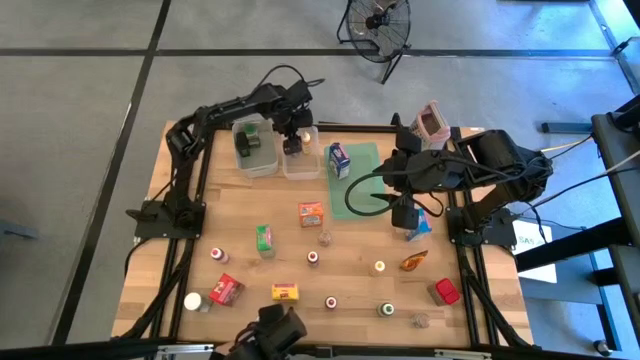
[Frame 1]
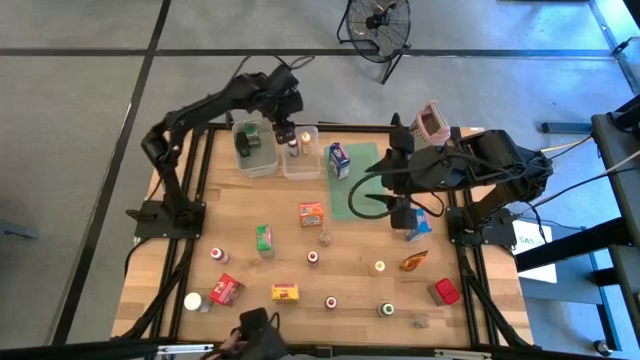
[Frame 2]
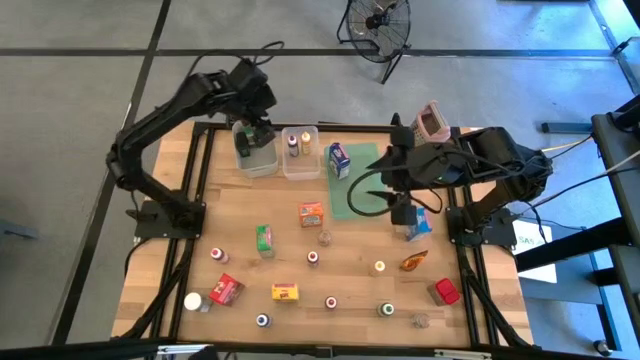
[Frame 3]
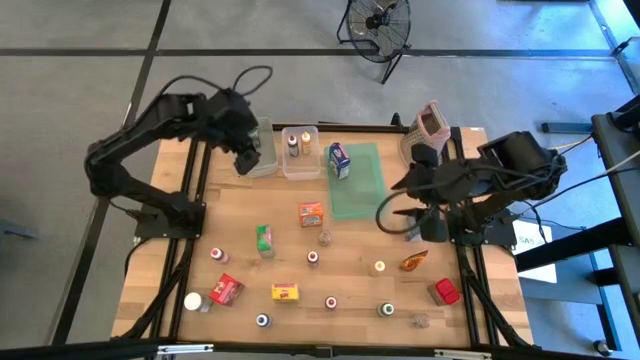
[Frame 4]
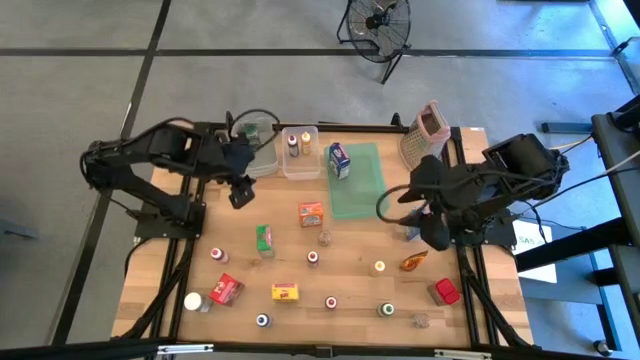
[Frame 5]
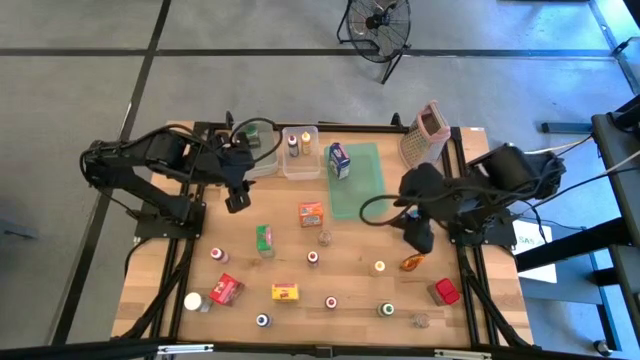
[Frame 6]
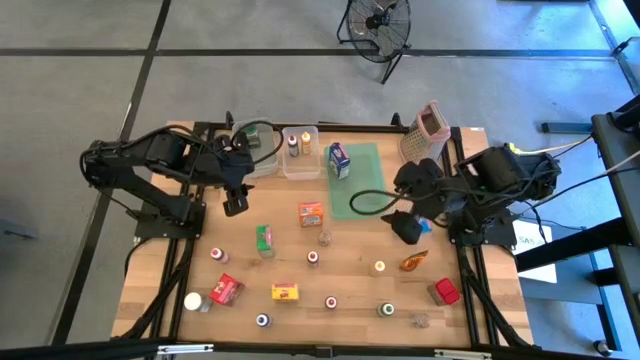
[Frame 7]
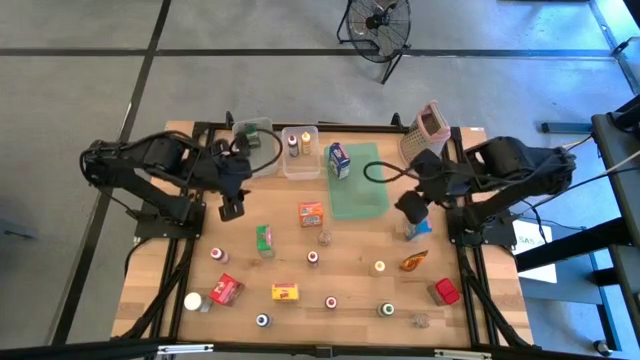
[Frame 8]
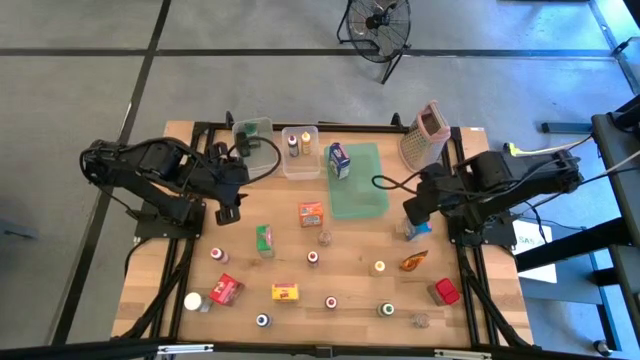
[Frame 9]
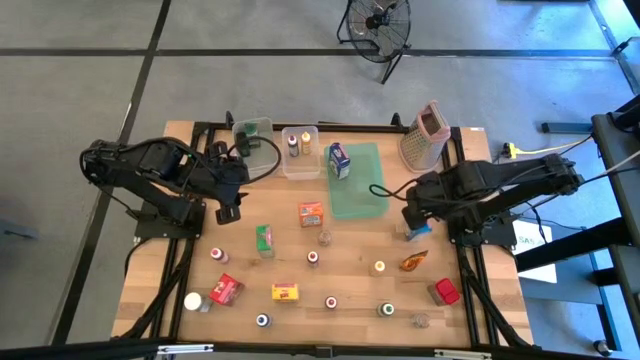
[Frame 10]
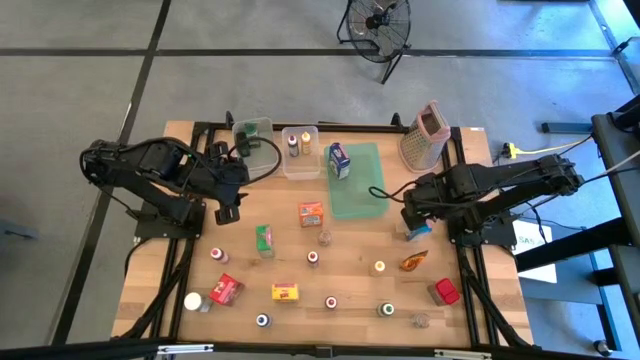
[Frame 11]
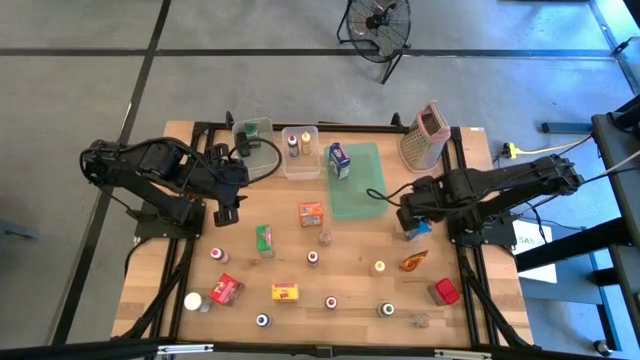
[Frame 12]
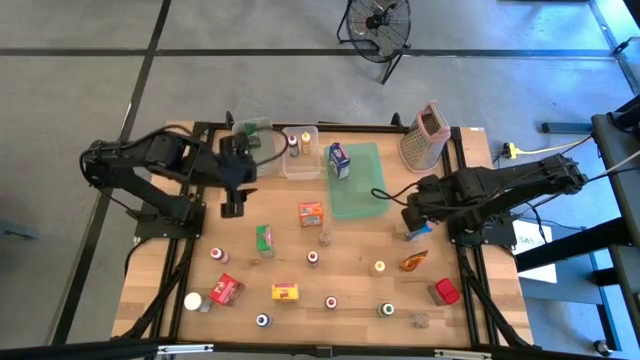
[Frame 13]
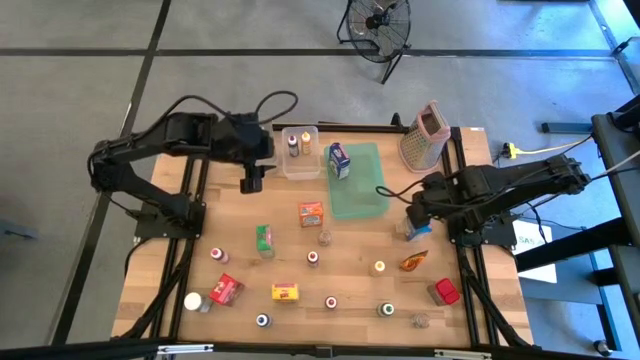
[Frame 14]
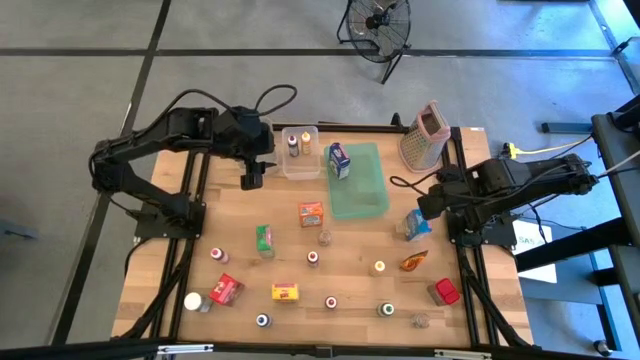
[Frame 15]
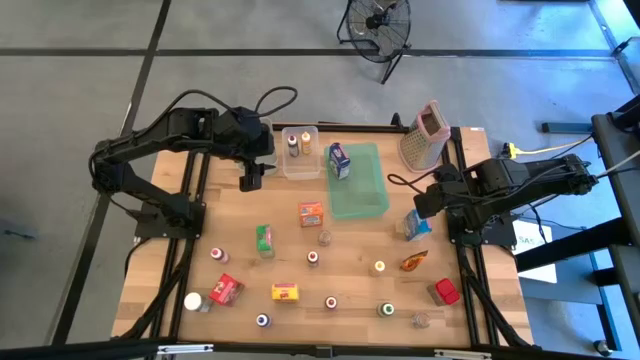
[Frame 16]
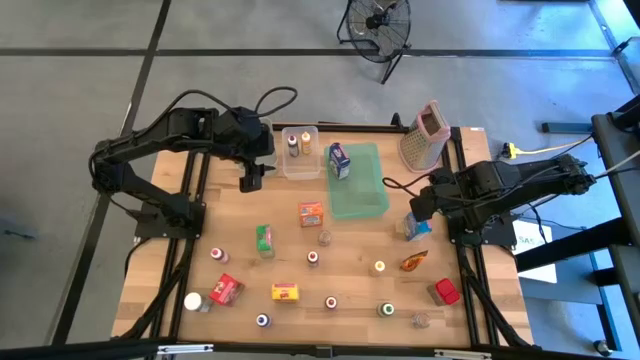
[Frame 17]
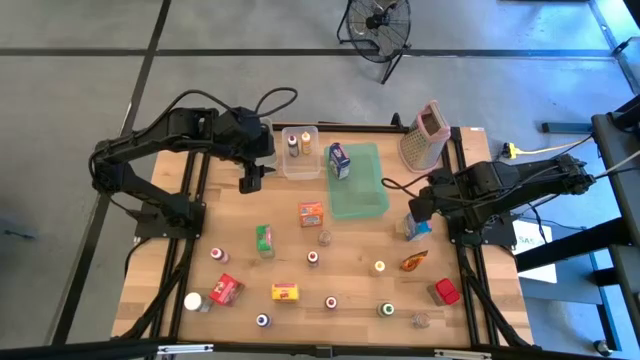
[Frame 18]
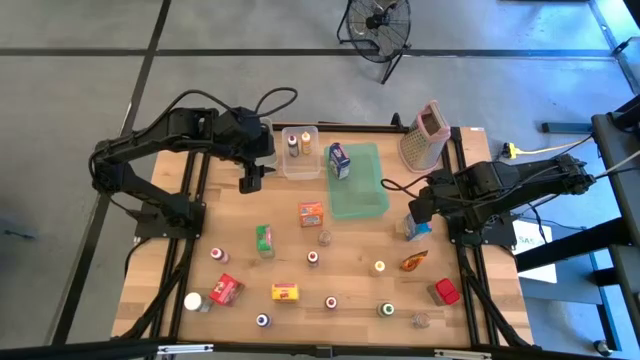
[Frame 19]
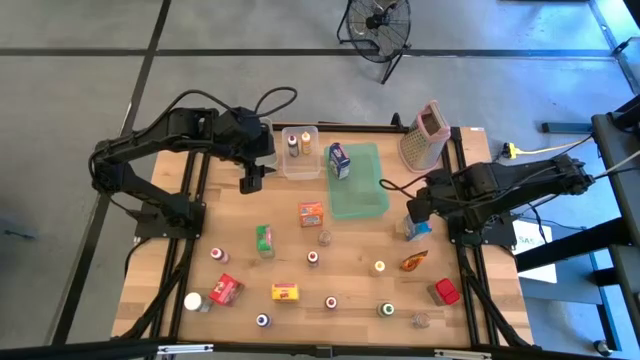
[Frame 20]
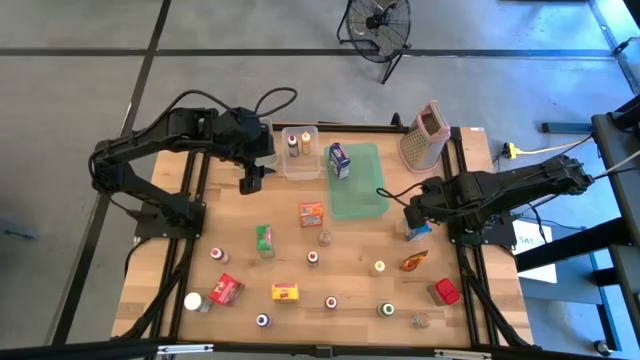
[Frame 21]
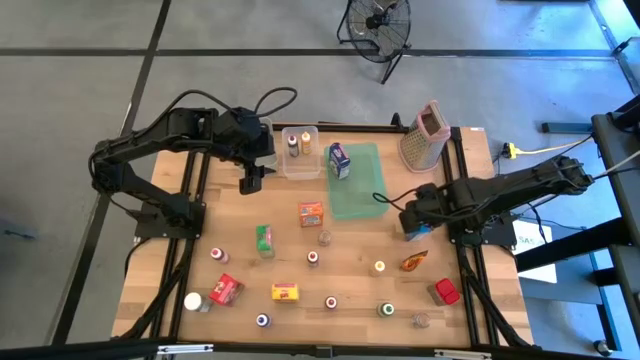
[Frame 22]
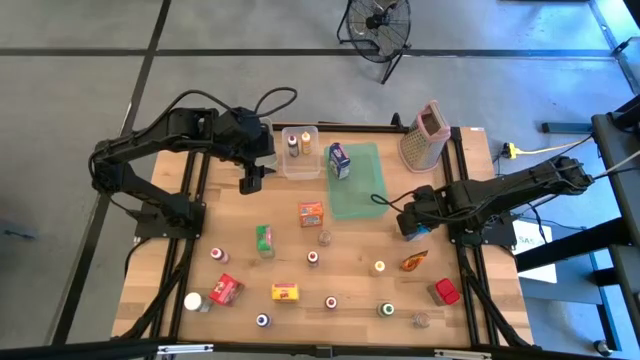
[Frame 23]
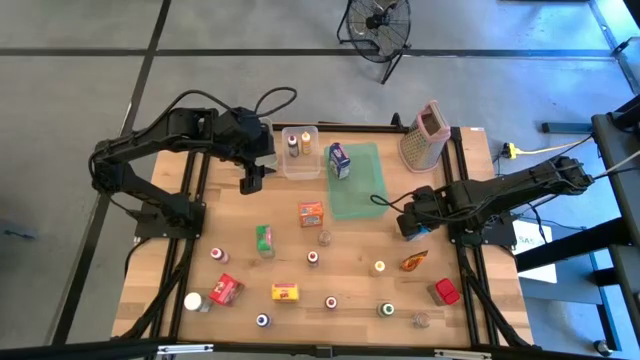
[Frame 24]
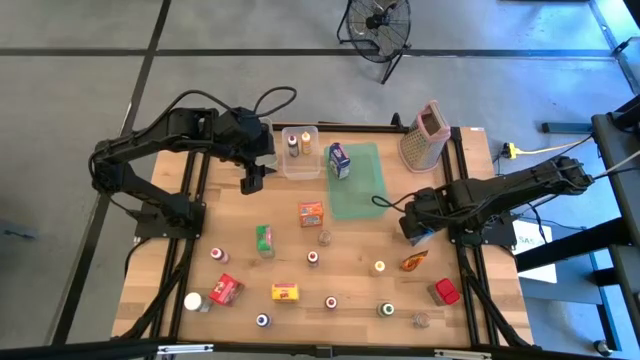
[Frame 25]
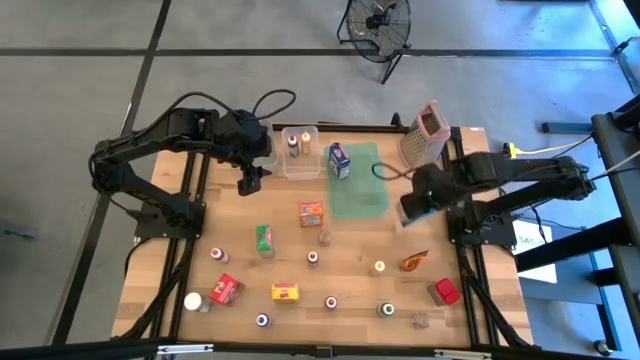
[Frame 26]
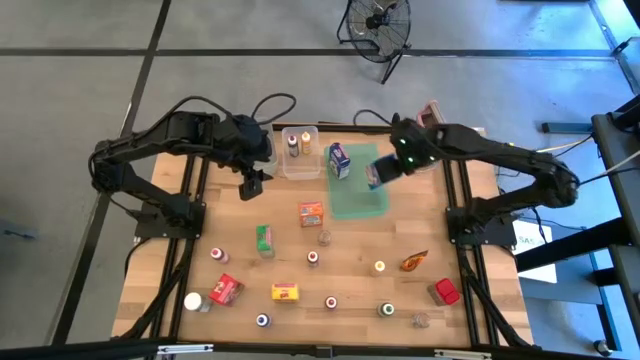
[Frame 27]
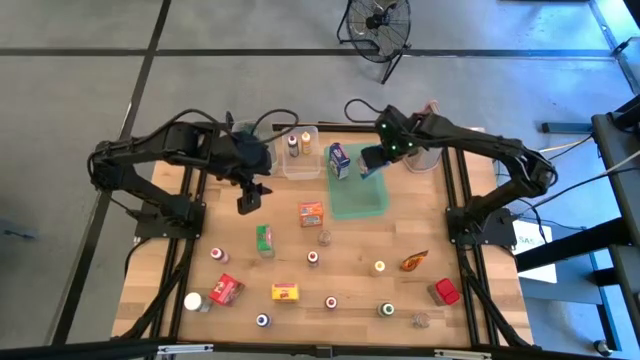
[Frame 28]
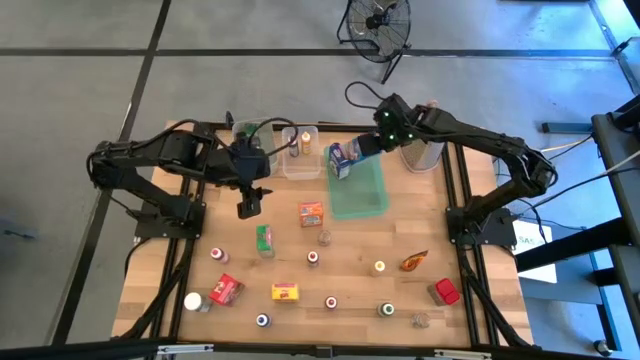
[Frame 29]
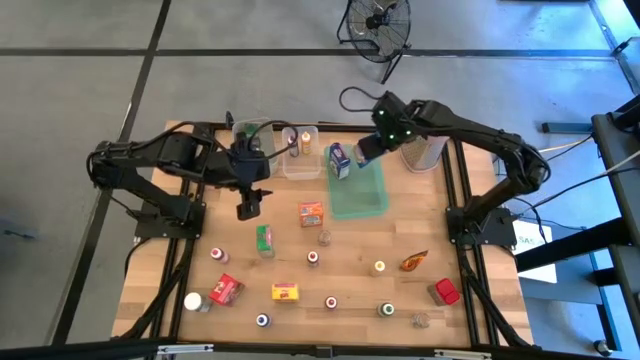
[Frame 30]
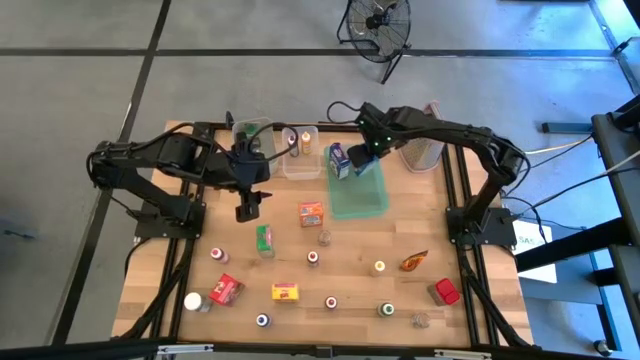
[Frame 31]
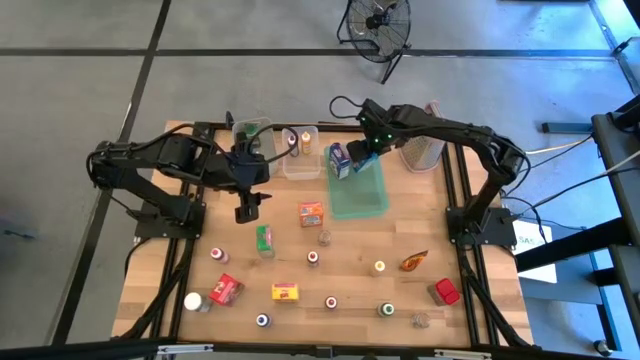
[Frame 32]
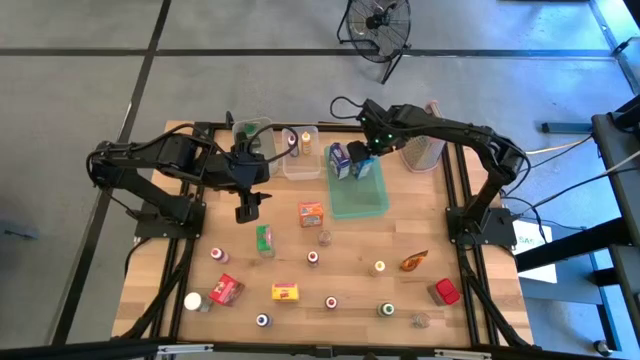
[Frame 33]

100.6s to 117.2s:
Task: Pick & Place Kitchen Items
Put the light blue cereal box into the blue bin

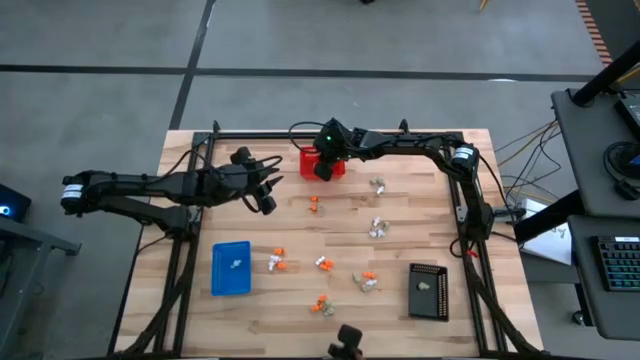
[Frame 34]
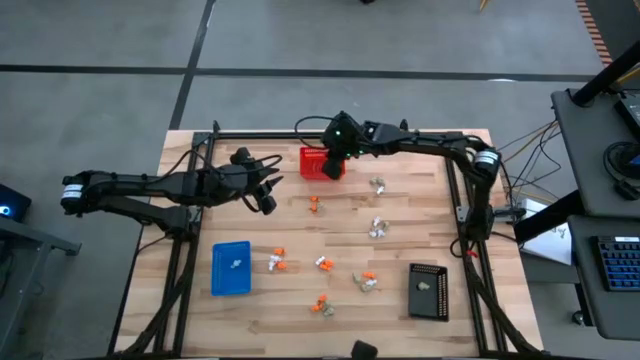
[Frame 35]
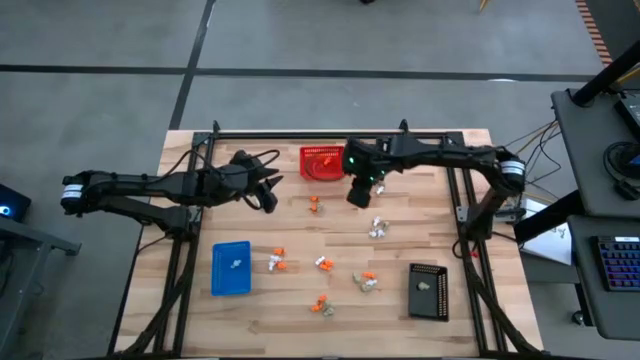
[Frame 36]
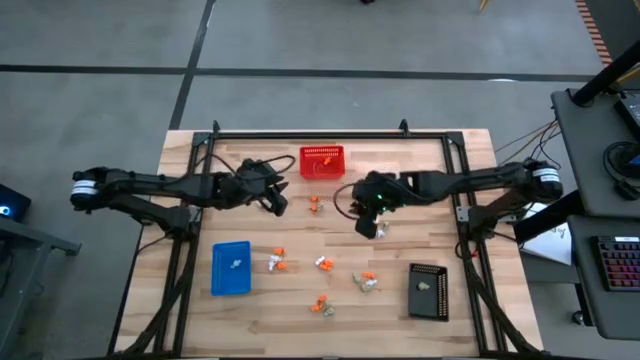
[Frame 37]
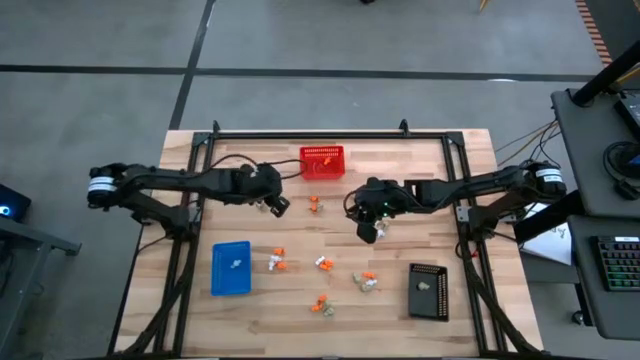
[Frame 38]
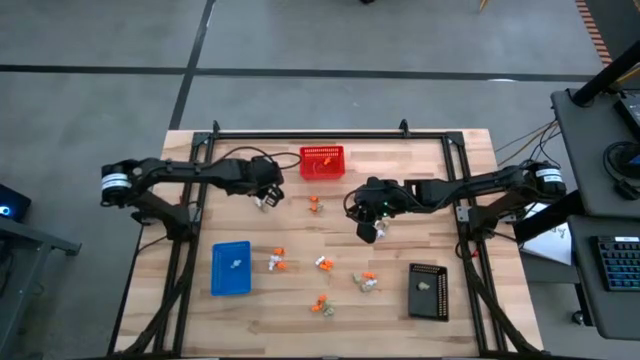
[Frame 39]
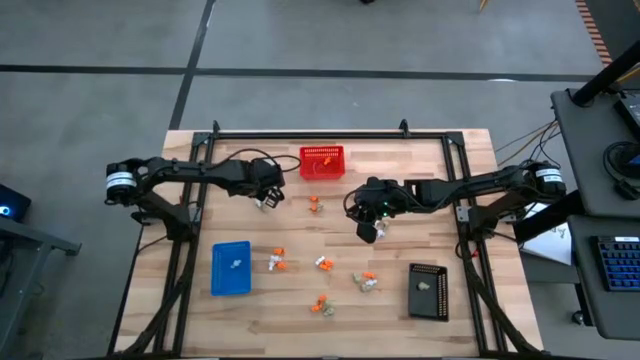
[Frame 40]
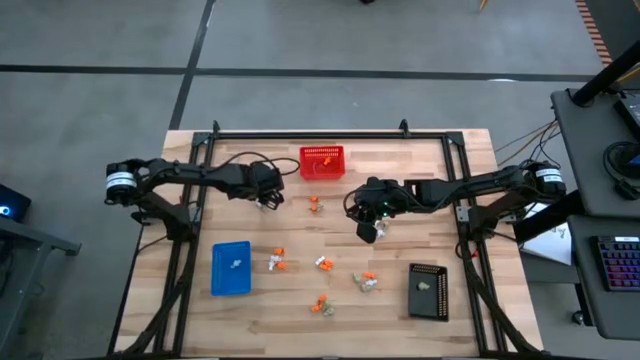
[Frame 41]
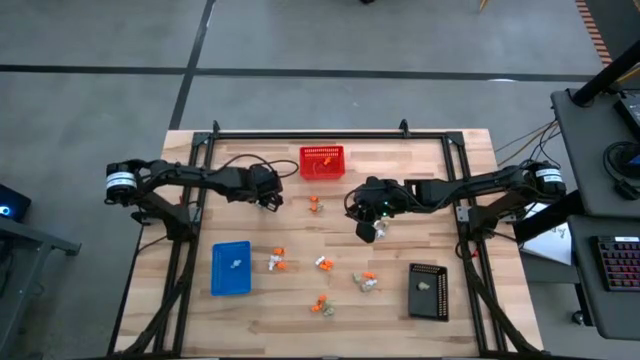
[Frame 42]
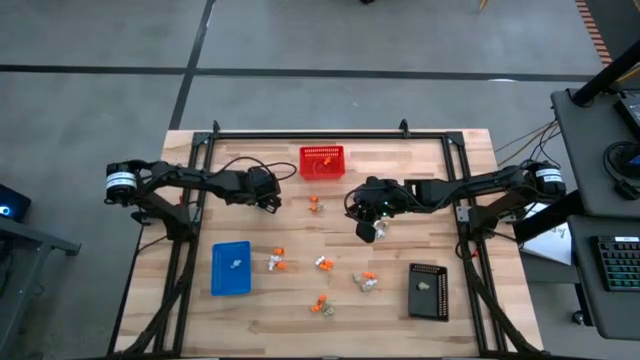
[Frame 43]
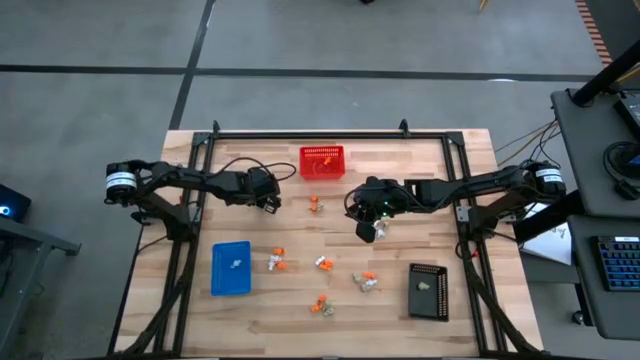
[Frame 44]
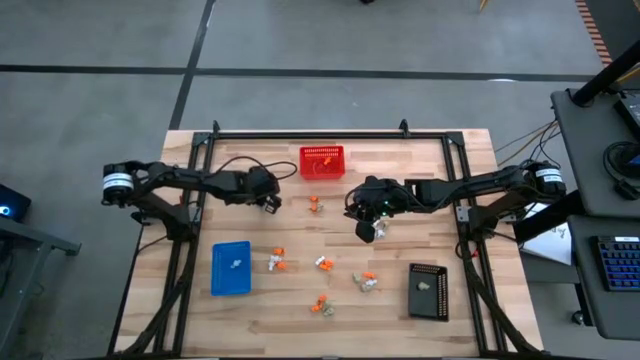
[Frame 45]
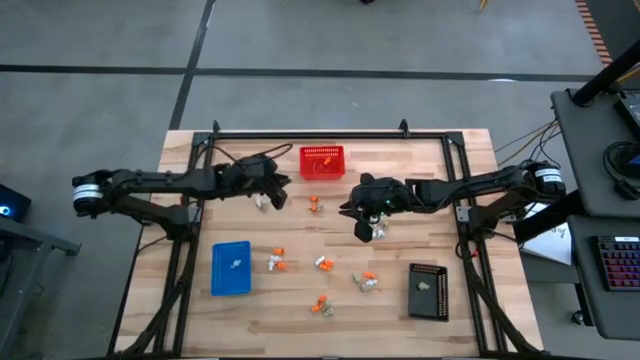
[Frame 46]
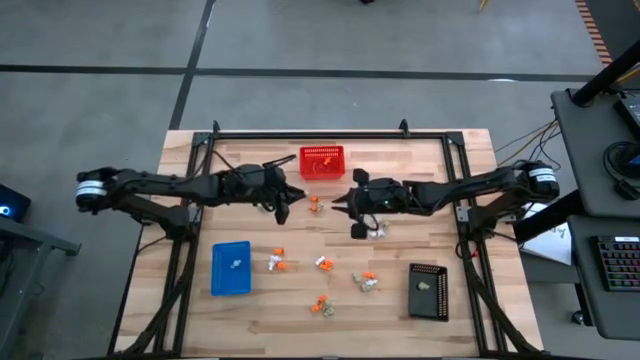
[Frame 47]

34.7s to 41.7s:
Task: Sort Halloween decoration
Put the gray skull toy into the black bin
